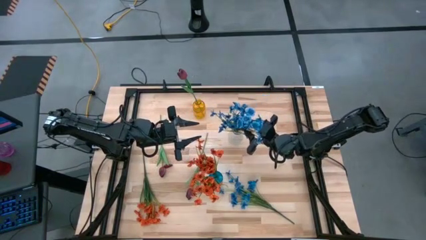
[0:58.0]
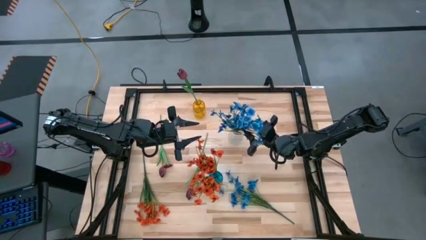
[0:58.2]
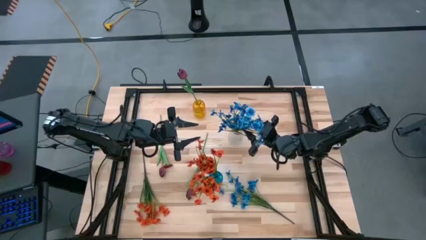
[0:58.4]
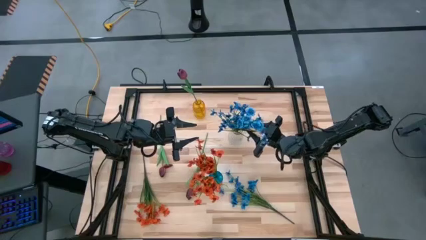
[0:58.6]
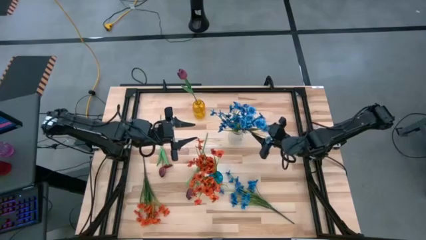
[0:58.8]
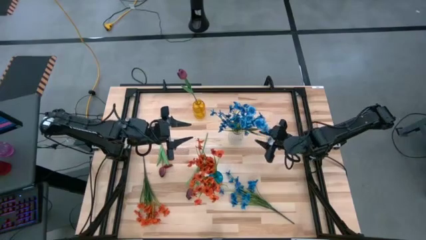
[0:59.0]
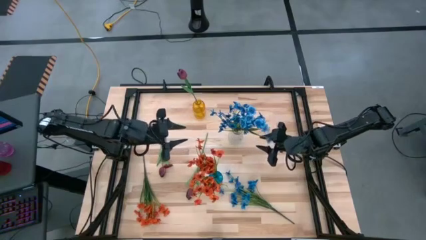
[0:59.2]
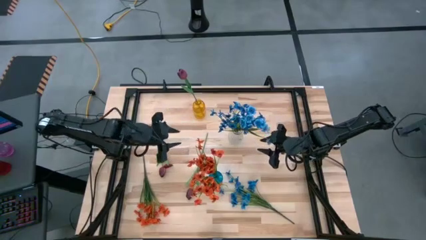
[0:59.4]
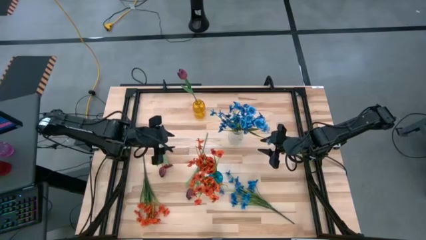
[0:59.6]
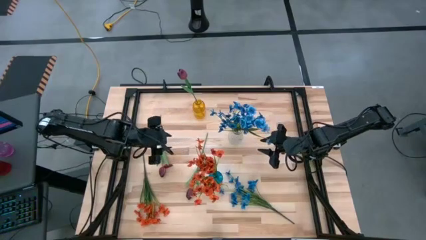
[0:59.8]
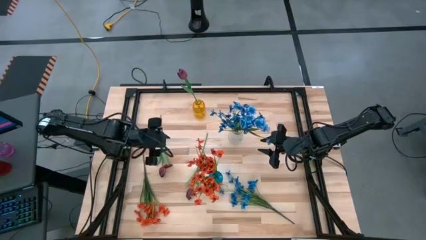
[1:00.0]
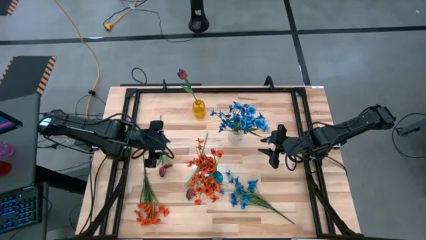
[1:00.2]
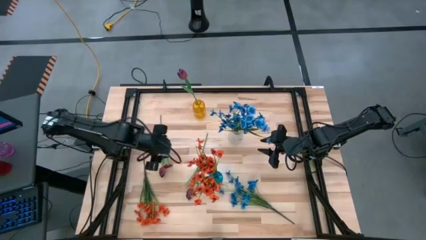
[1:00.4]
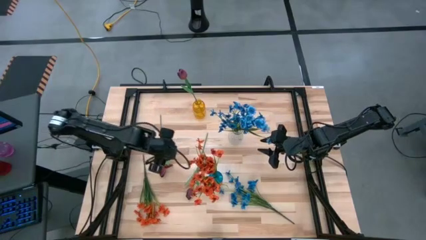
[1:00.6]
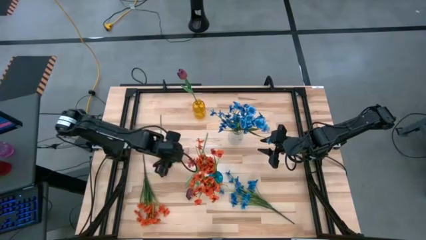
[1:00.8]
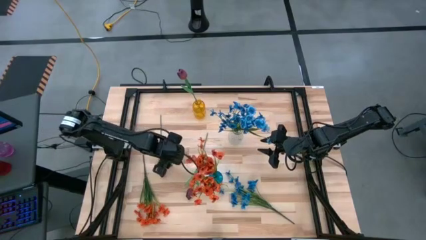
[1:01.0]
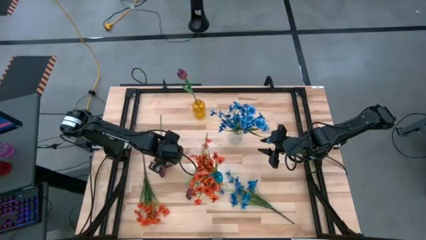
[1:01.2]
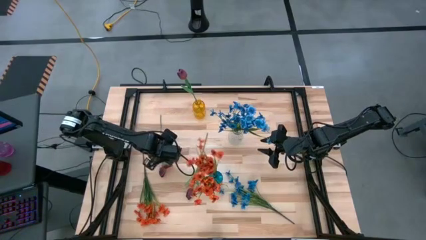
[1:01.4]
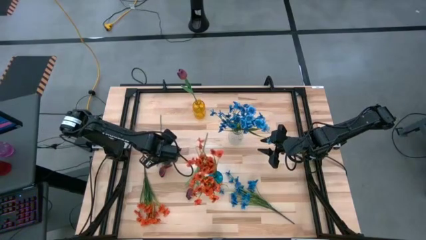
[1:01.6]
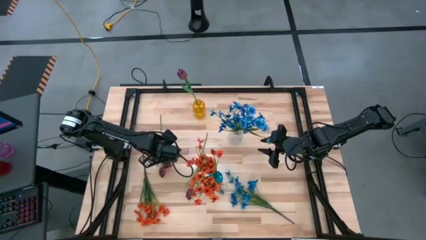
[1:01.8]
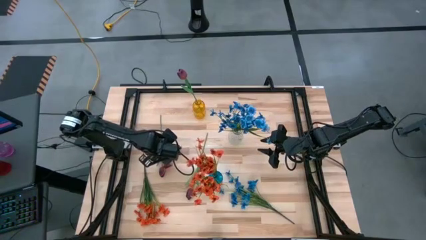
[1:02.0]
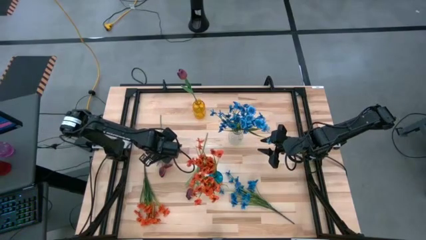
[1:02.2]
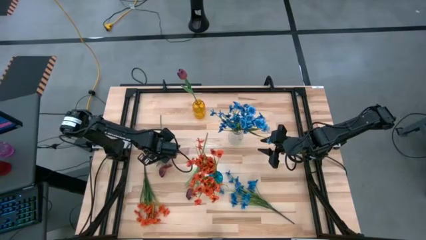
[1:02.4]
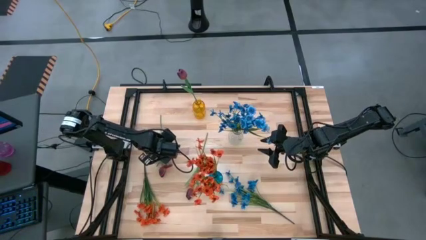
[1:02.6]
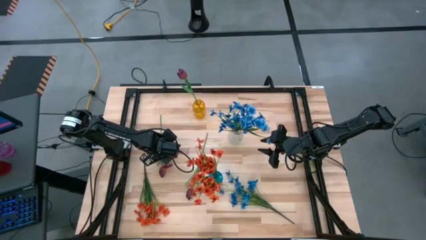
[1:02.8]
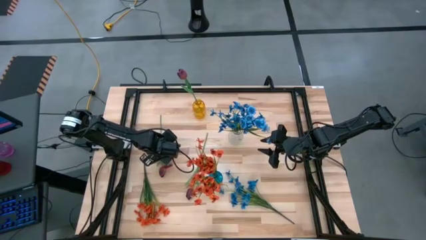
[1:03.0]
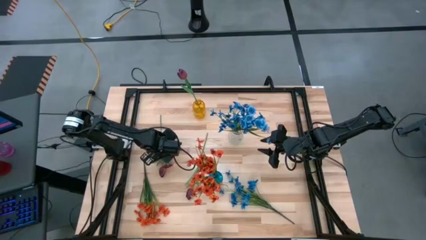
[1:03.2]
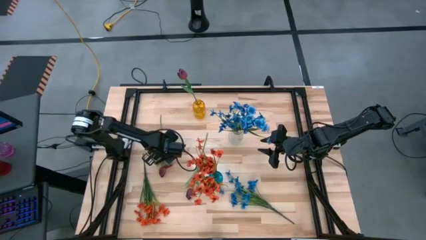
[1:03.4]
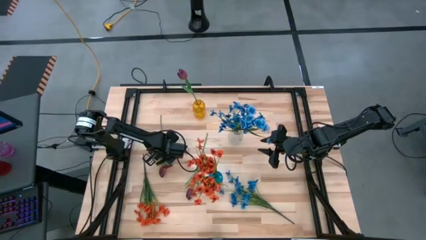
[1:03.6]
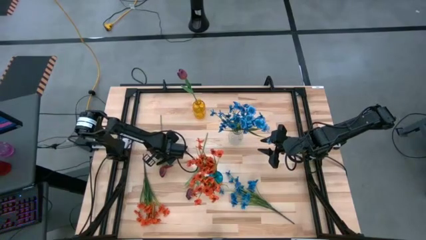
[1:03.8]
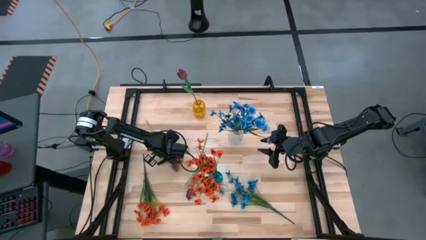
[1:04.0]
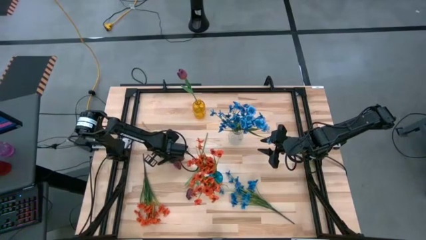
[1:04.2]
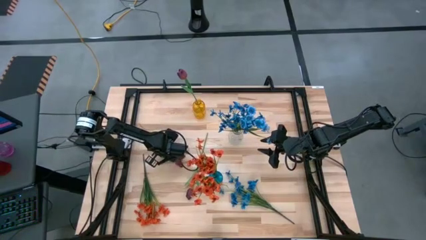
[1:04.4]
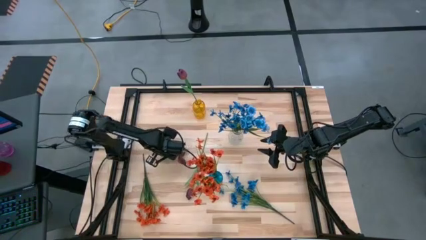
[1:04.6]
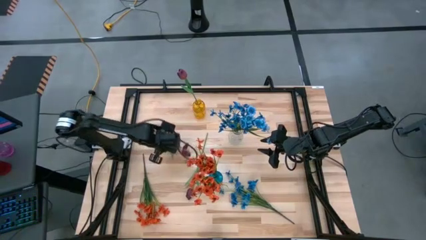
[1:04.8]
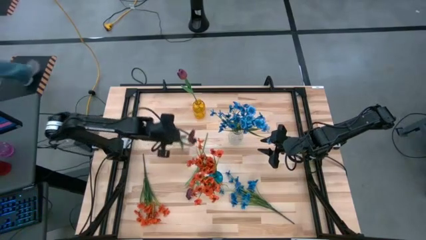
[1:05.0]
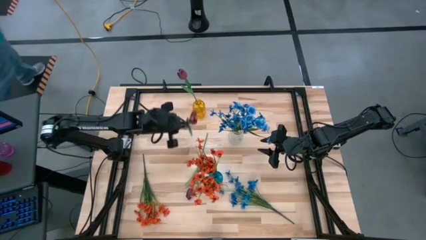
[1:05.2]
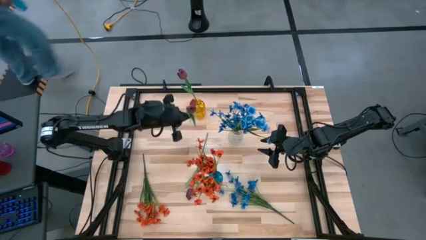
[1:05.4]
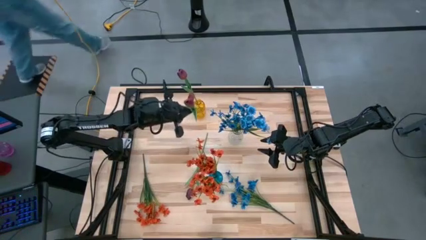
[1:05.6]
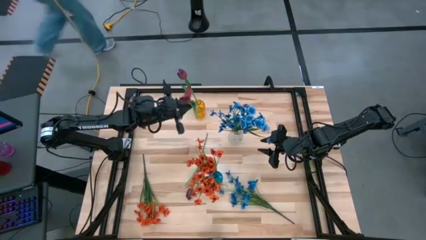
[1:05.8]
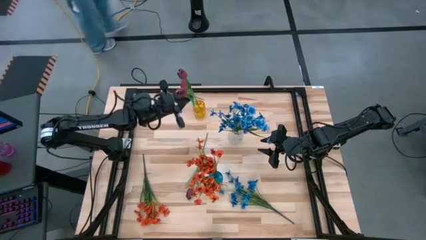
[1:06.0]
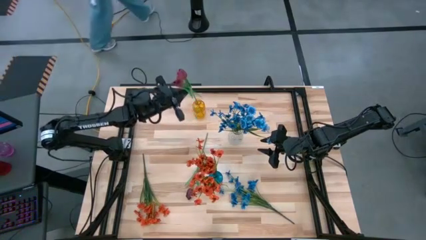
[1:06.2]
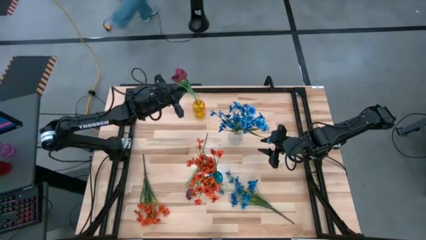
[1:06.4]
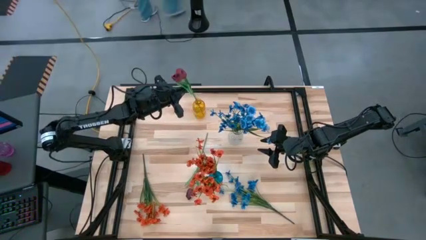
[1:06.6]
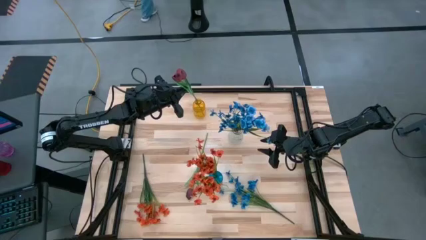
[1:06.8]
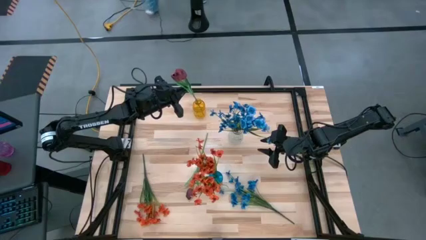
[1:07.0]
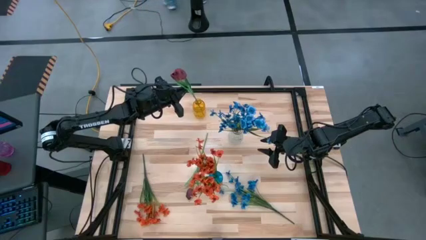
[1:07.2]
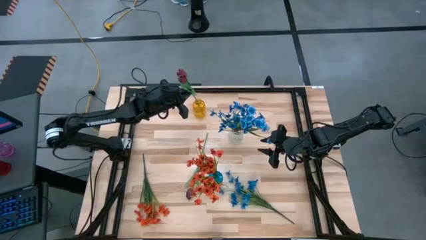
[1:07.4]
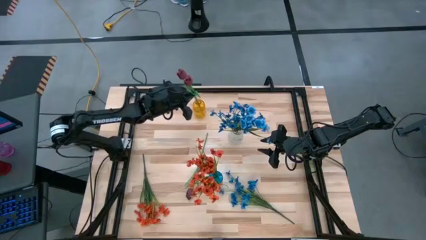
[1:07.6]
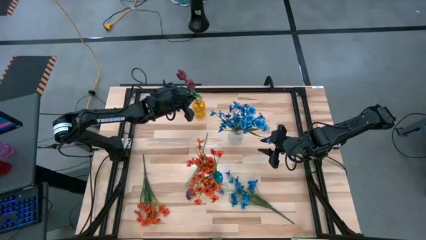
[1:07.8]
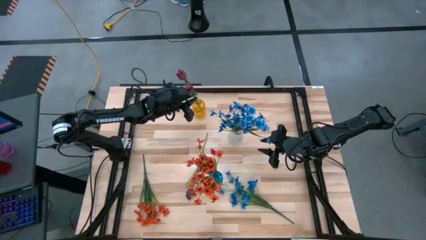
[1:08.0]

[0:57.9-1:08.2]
Task: Sort flowers into vase by color
Put the left red flower into the yellow vase

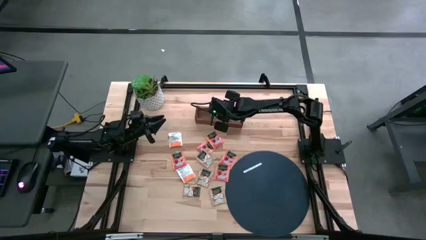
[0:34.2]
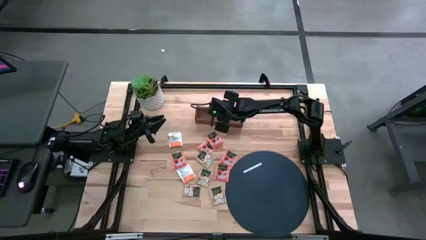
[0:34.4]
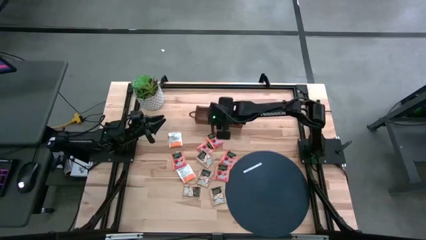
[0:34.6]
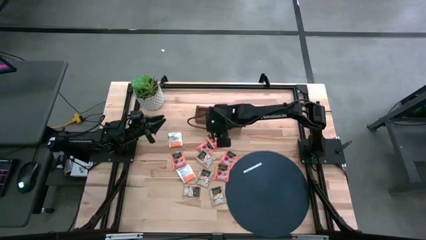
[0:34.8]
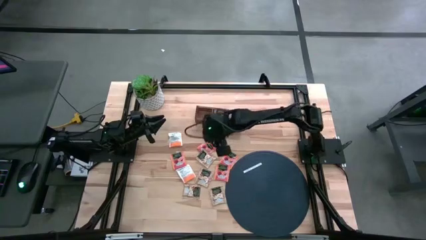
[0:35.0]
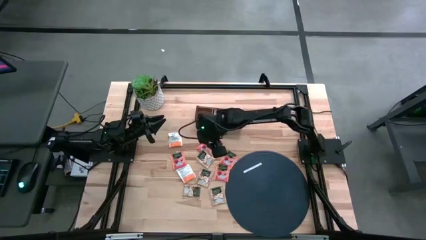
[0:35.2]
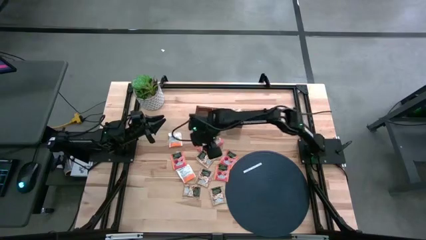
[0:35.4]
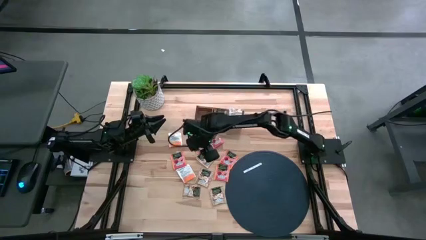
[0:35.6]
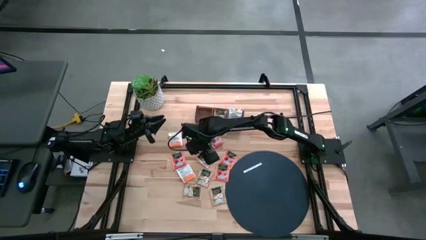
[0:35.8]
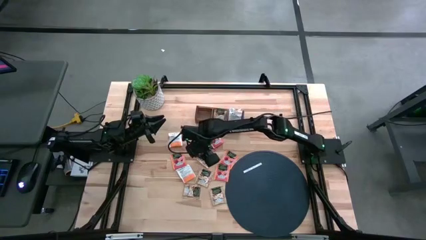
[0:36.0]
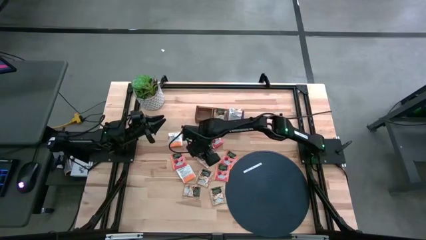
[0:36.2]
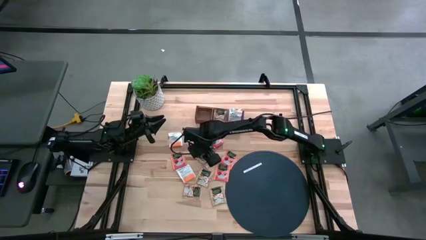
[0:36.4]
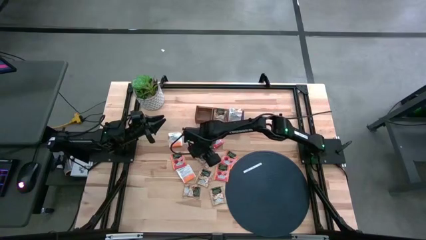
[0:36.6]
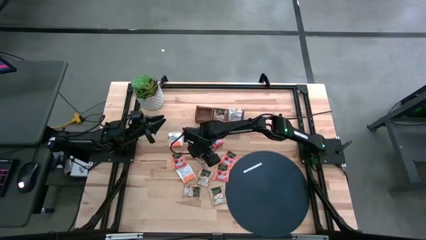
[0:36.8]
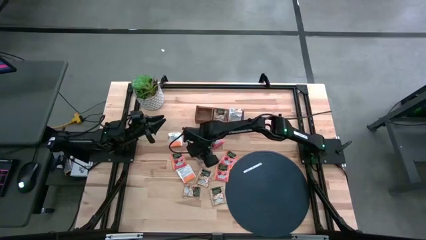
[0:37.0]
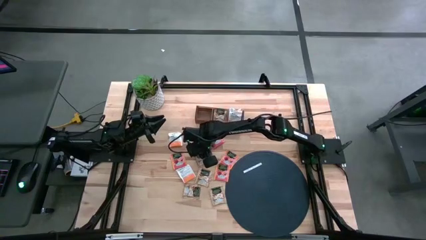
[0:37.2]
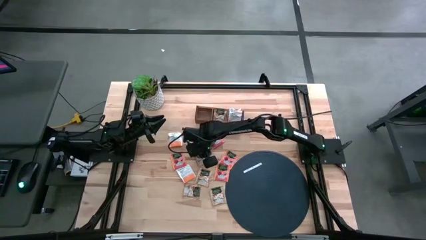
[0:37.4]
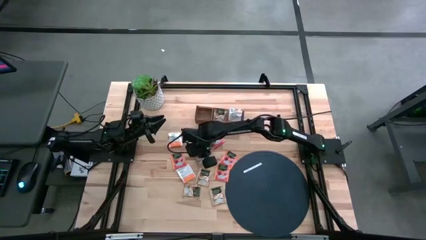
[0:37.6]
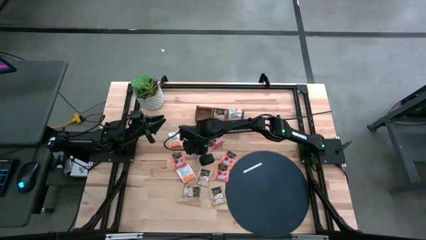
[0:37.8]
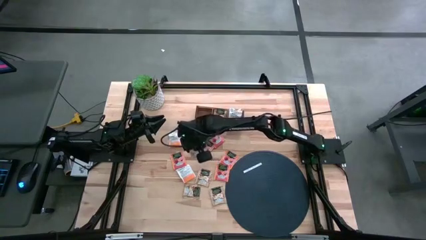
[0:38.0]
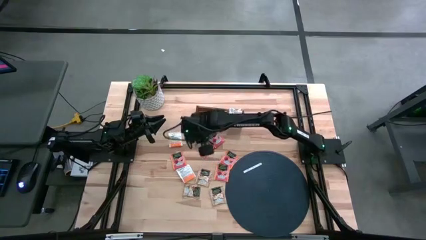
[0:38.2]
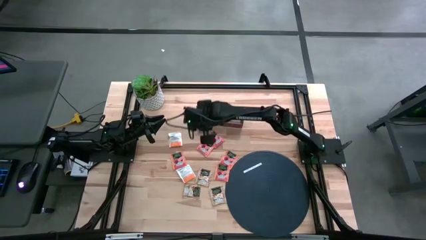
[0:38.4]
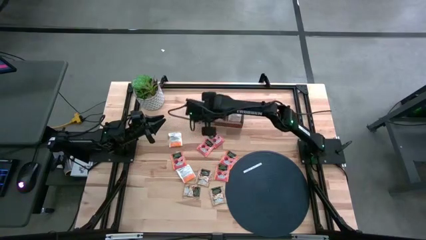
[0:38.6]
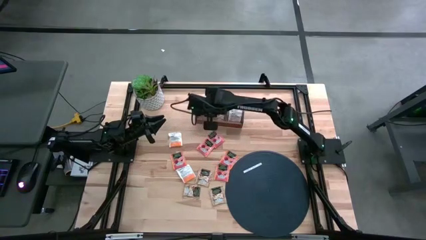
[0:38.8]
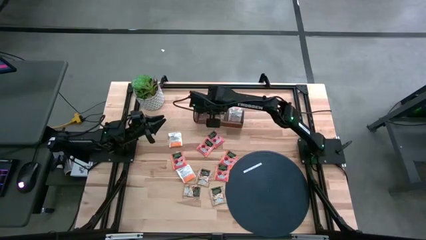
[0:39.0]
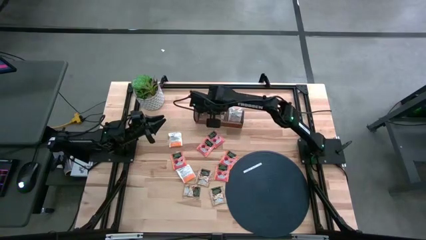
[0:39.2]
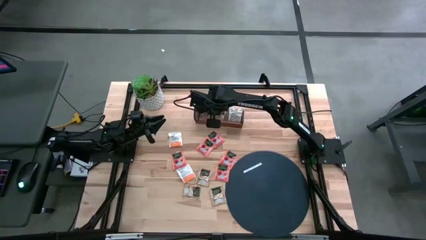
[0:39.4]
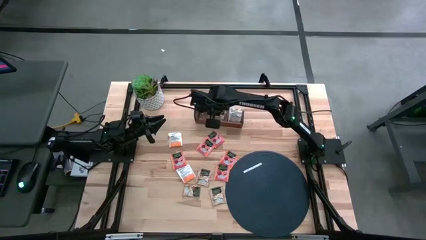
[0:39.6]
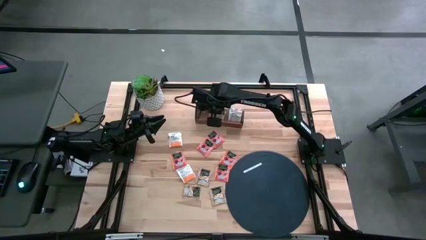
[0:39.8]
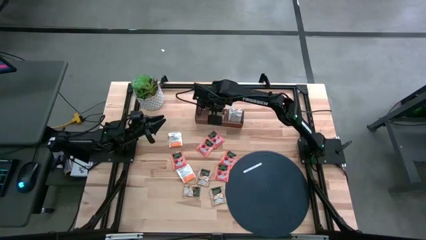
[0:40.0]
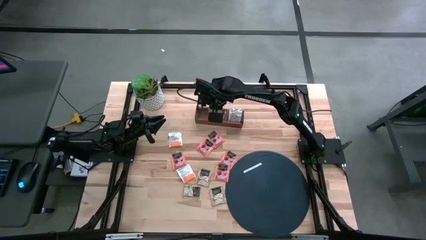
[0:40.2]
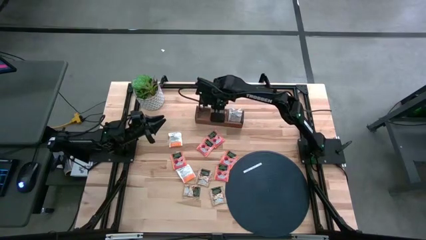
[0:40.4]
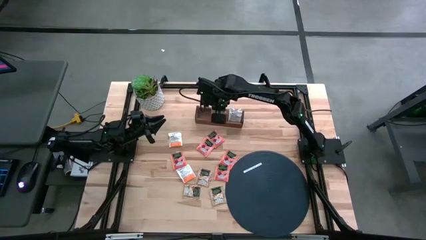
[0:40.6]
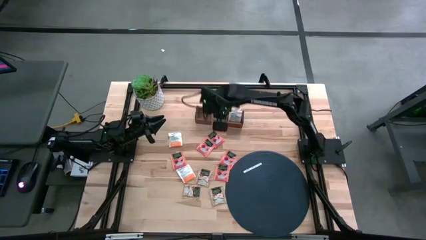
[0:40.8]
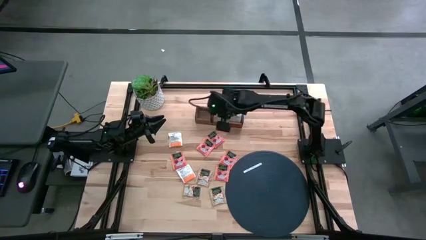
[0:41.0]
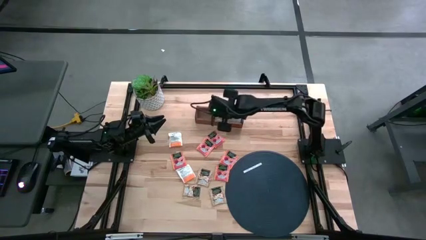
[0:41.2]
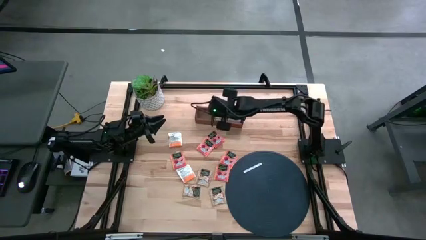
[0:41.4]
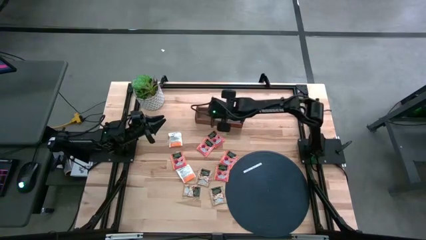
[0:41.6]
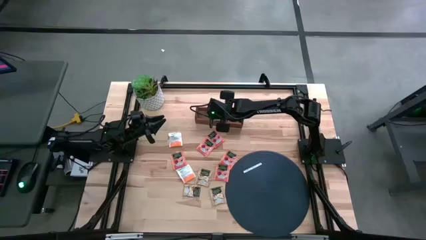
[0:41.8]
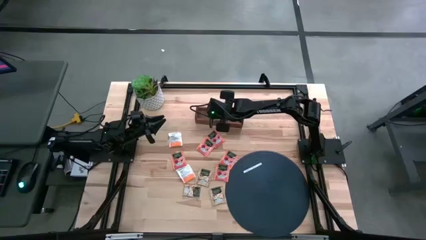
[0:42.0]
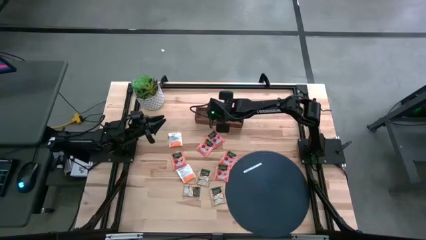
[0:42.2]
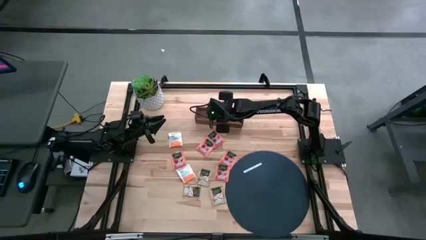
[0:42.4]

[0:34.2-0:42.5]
Task: Pick & Place Tea
Put the brown tea sachet into the middle section of the wooden organizer
